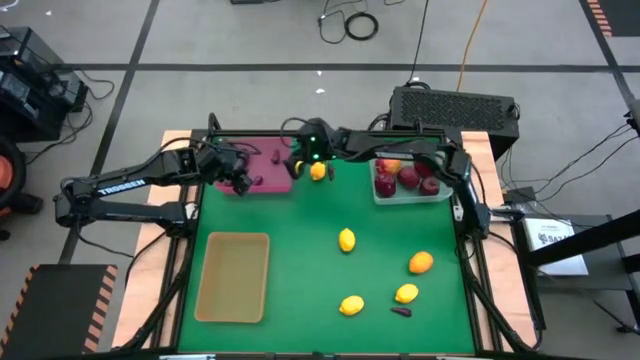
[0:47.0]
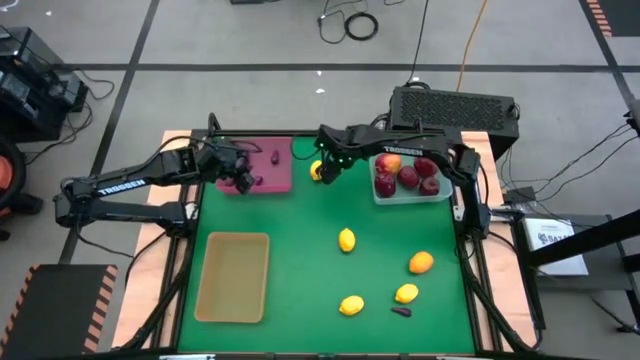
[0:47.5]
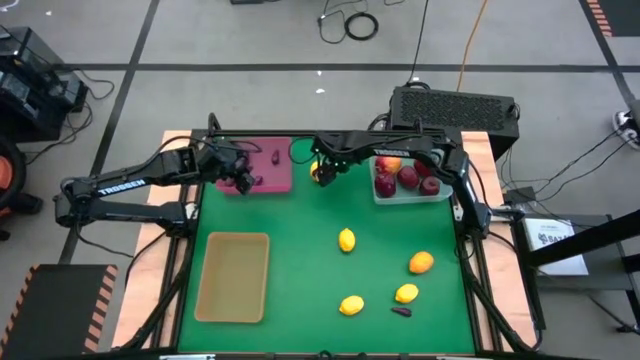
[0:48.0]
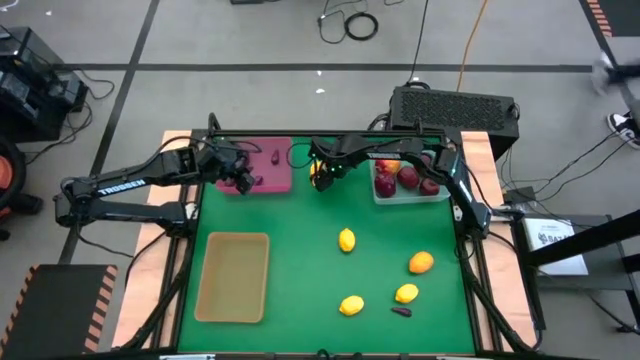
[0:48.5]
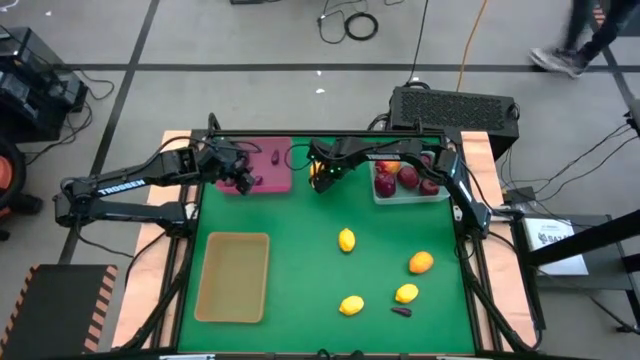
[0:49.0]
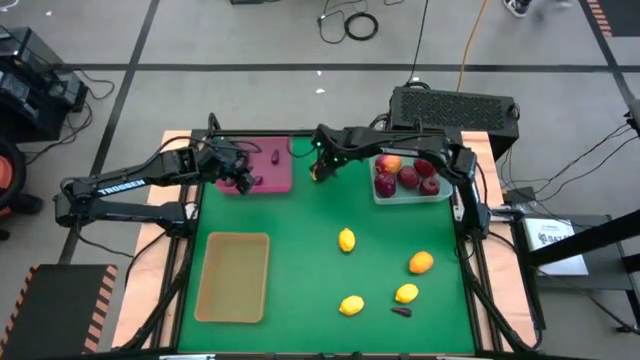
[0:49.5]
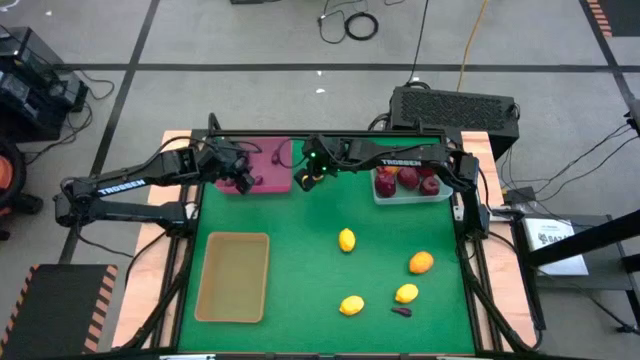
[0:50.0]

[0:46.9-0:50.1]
Task: Sort produce into baskets
Put the eggplant into the pink bin

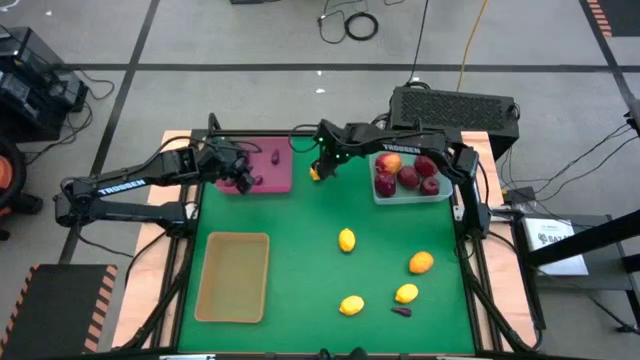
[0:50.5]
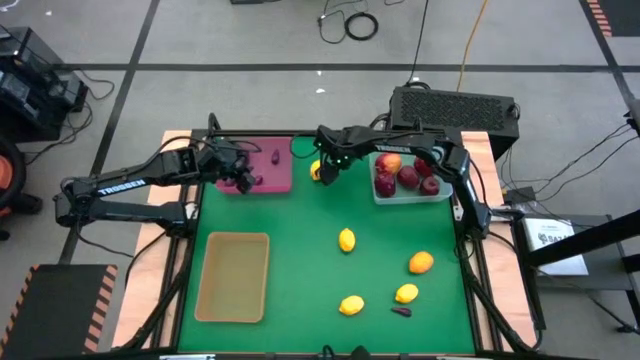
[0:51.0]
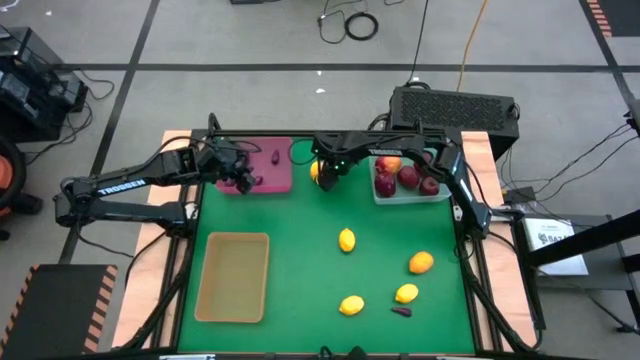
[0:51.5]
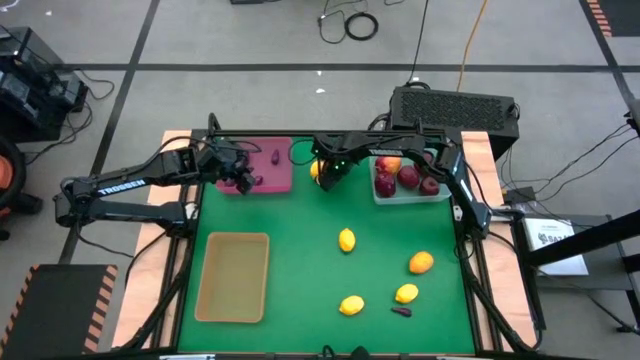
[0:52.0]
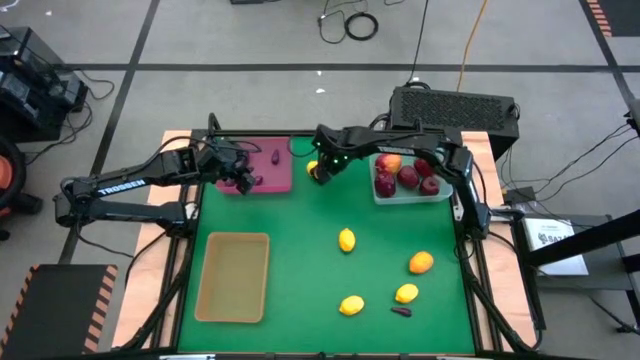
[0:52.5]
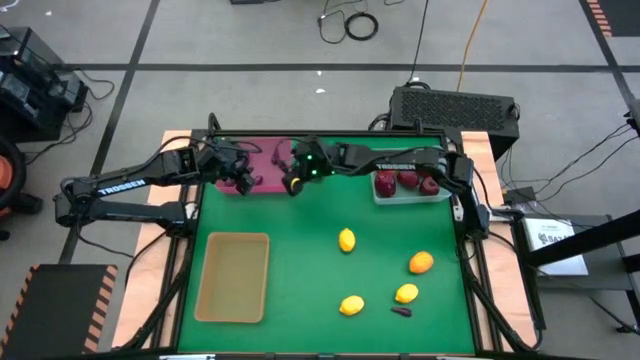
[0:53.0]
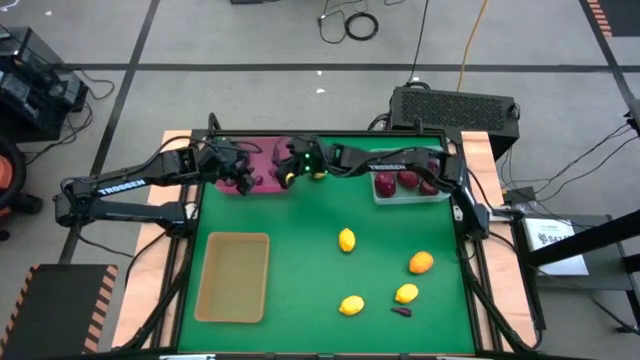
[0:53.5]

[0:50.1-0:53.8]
Put the eggplant into the pink bin

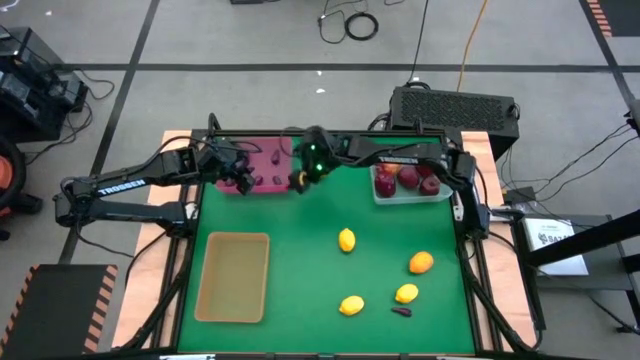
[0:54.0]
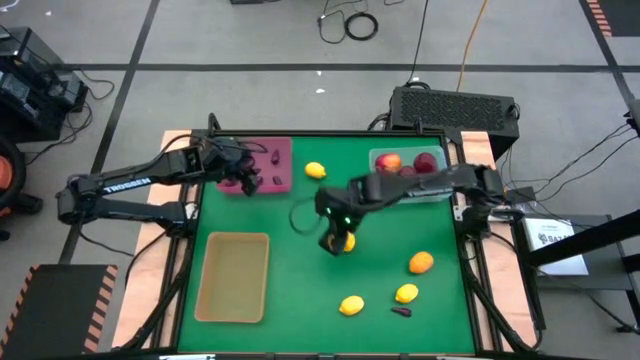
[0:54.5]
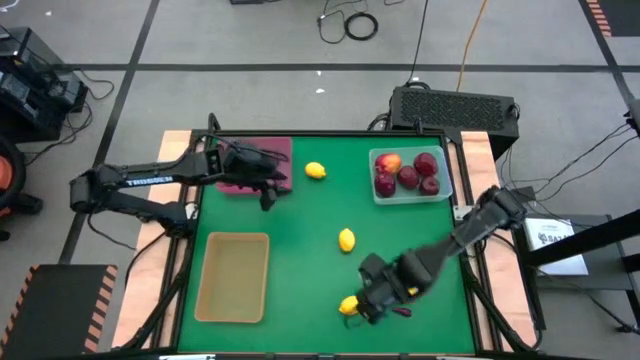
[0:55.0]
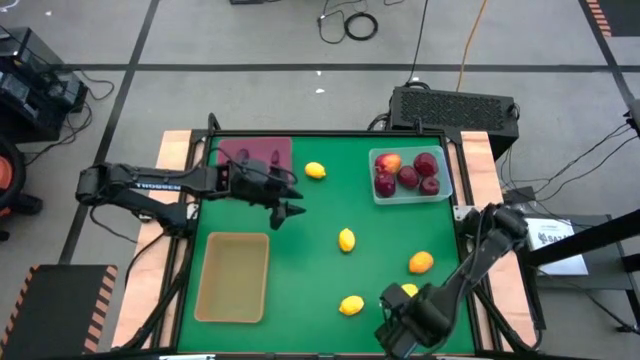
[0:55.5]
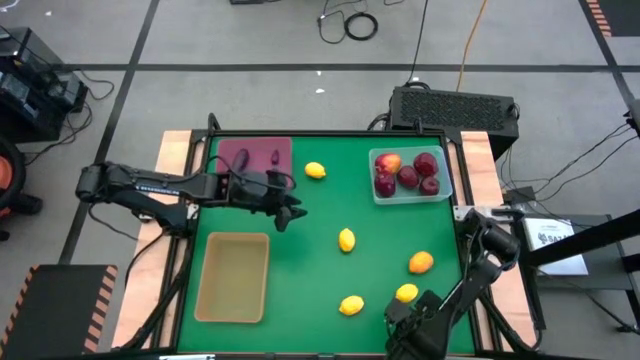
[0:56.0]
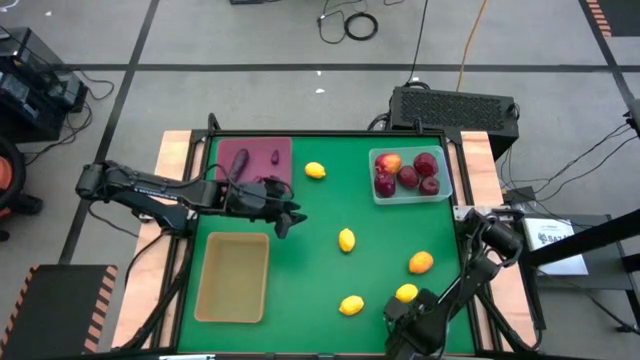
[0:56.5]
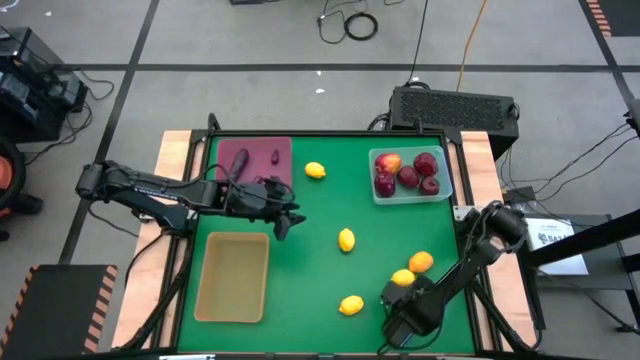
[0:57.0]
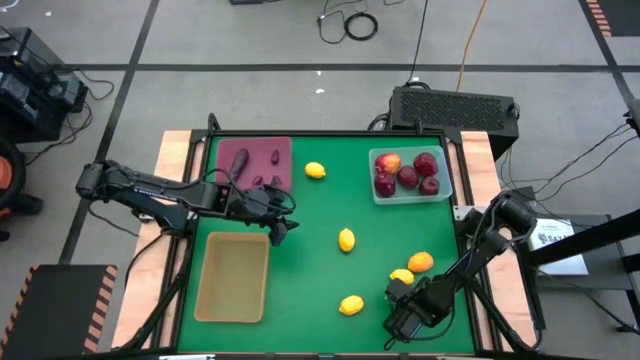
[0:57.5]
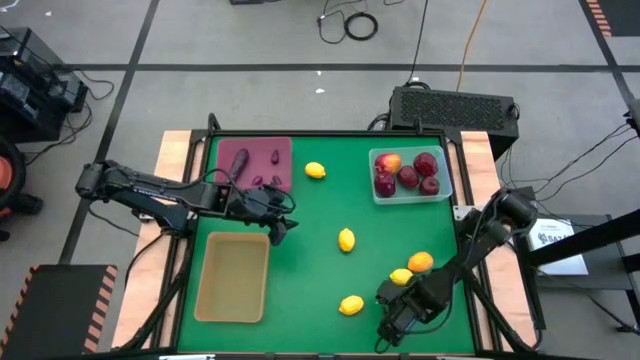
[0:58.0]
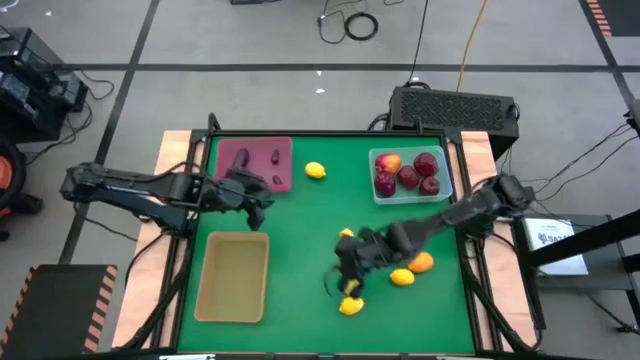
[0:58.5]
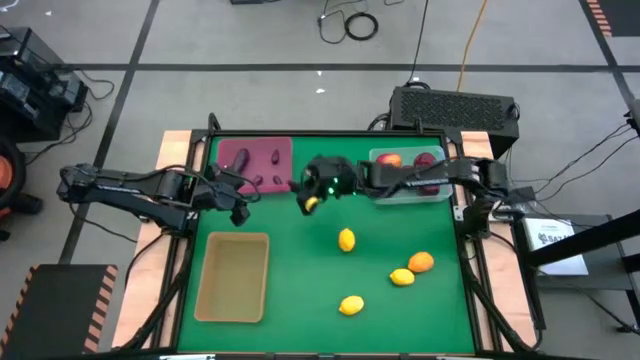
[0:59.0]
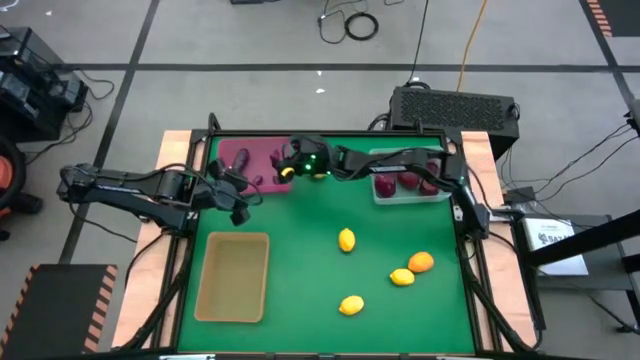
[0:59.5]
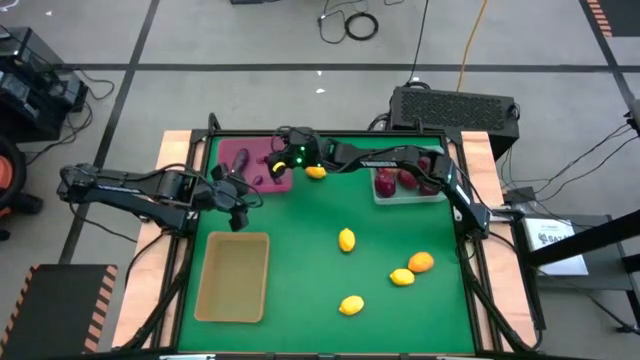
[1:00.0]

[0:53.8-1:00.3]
Put the eggplant into the pink bin

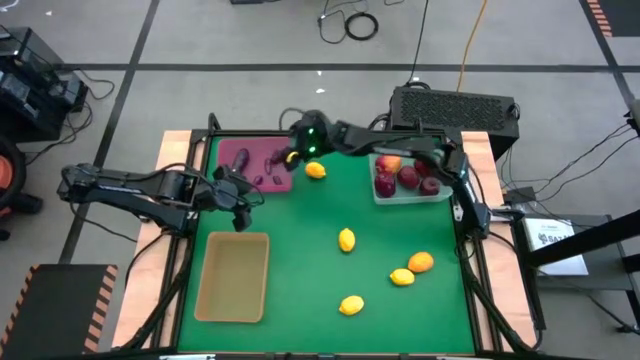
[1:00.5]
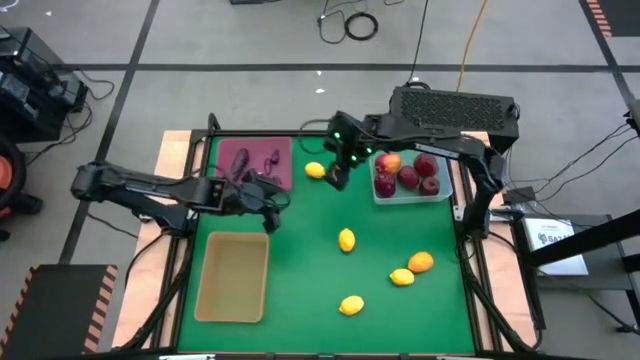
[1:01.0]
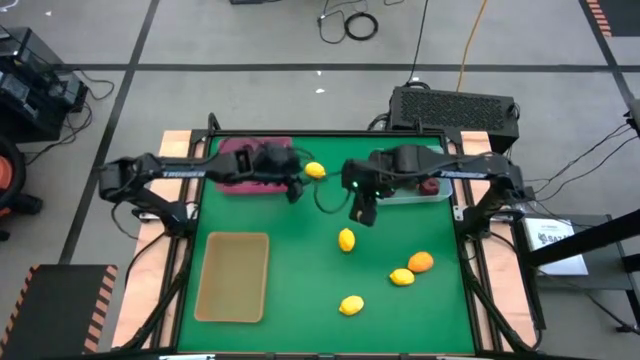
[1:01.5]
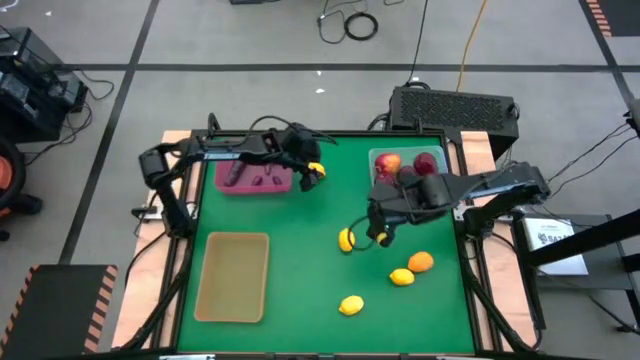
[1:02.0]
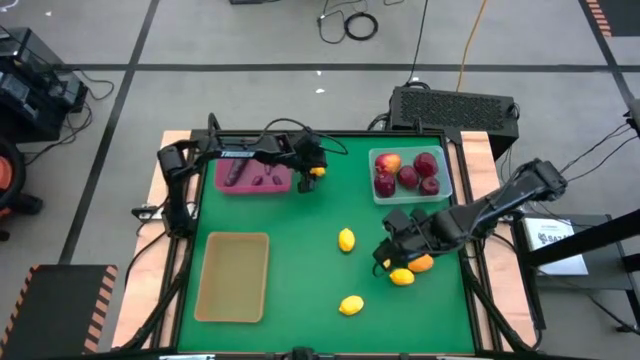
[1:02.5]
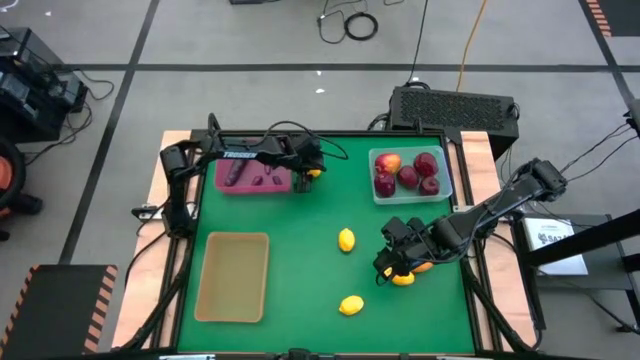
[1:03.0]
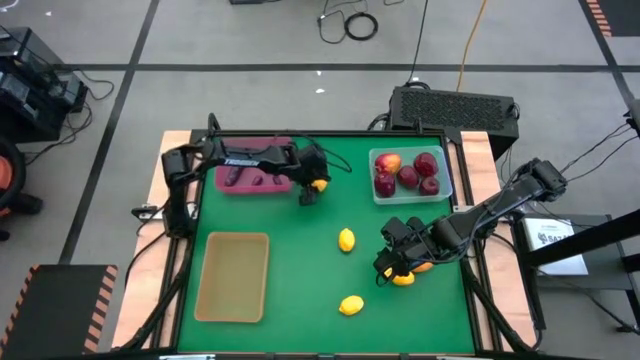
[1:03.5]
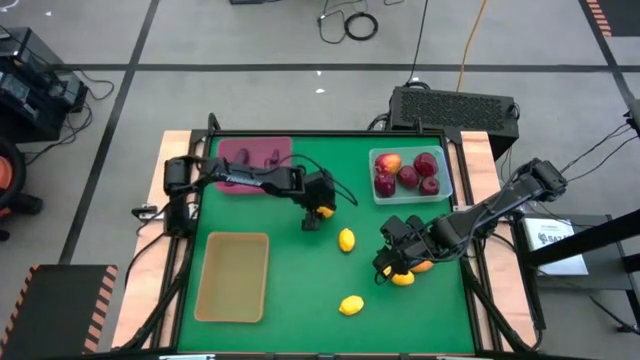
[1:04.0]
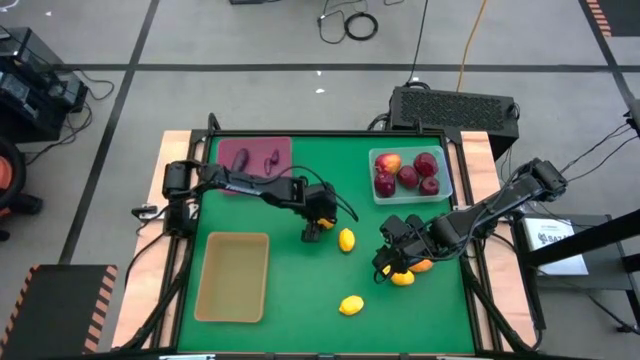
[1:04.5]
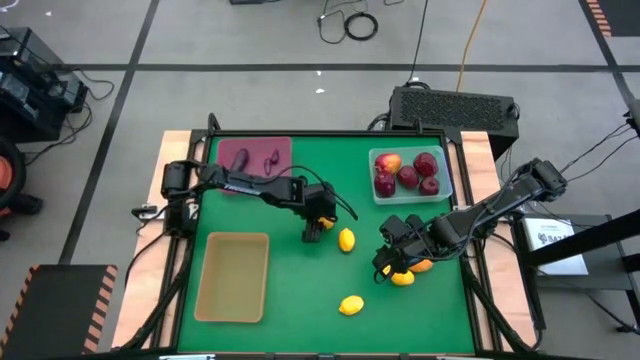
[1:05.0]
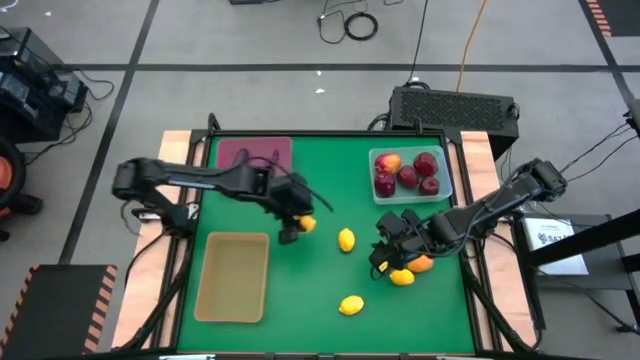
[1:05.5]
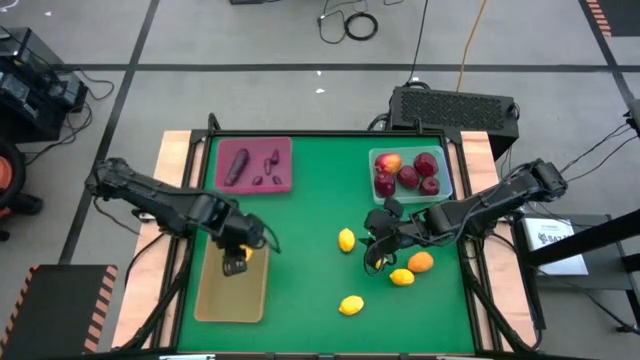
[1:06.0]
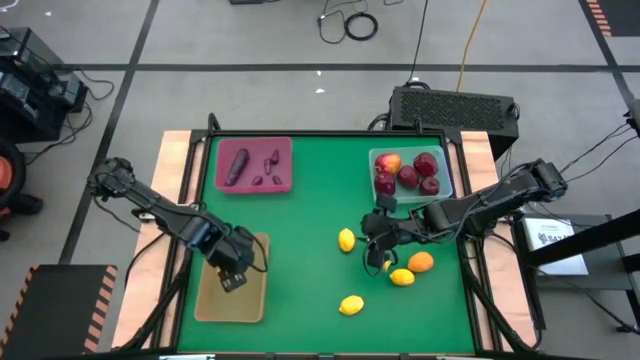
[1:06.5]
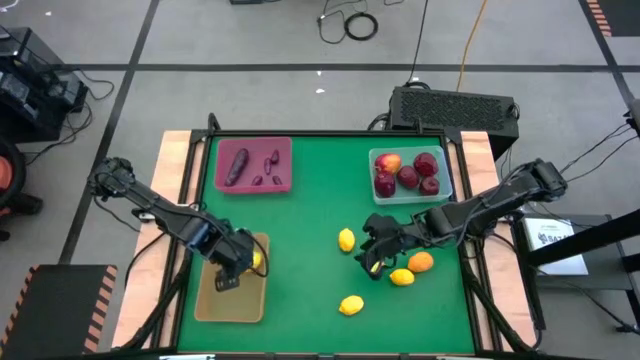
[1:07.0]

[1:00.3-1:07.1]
Put the lemon into the green bin

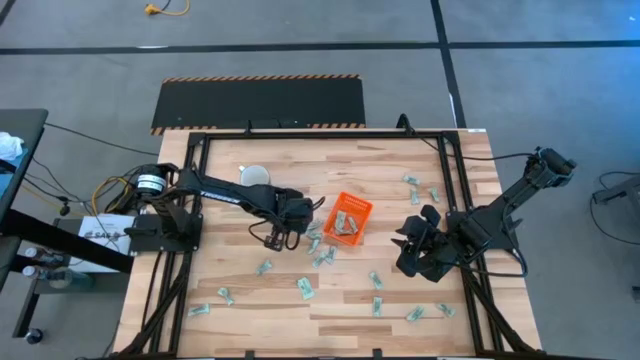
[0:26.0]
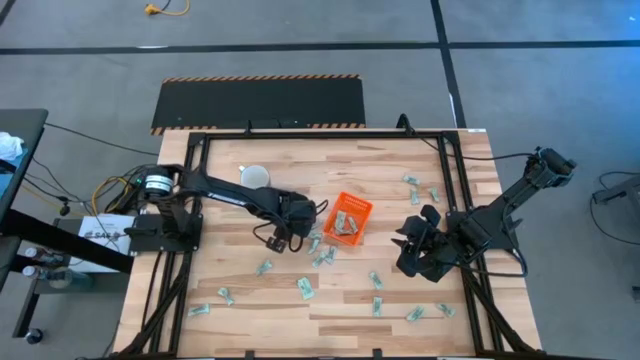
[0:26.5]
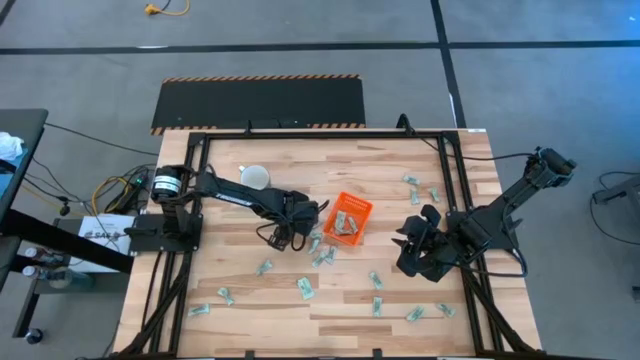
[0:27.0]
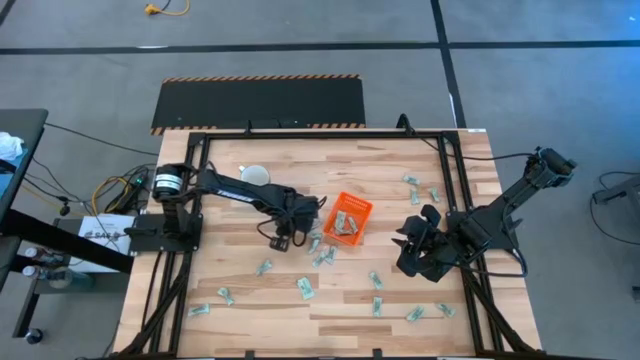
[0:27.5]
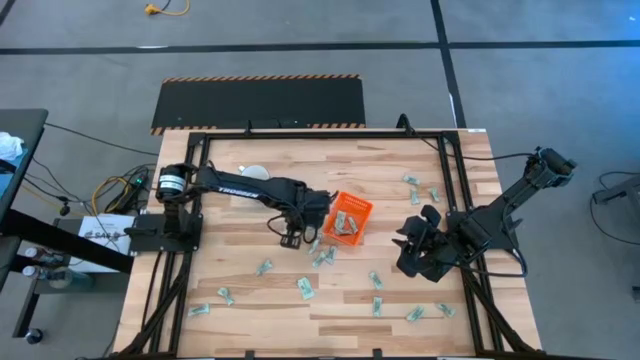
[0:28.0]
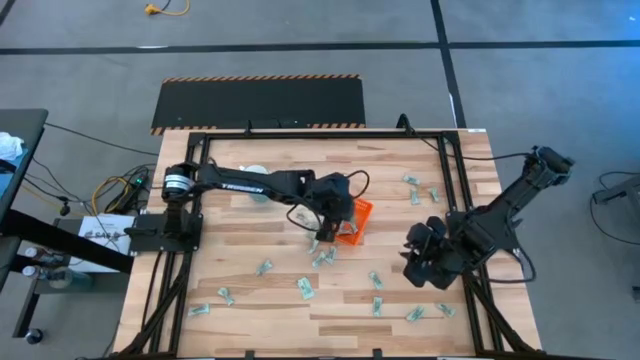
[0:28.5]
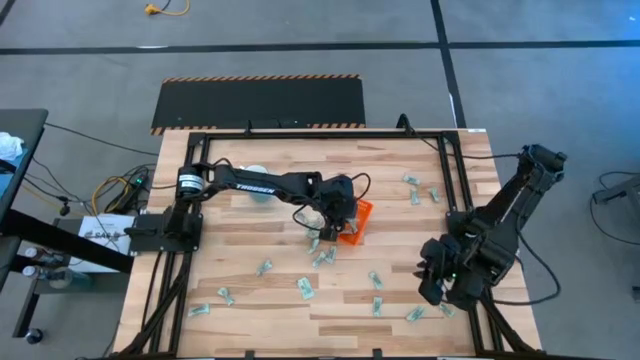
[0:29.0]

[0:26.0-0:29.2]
Task: Pick and place Stevia / Truvia into bins
Put the stevia packet into the basket
